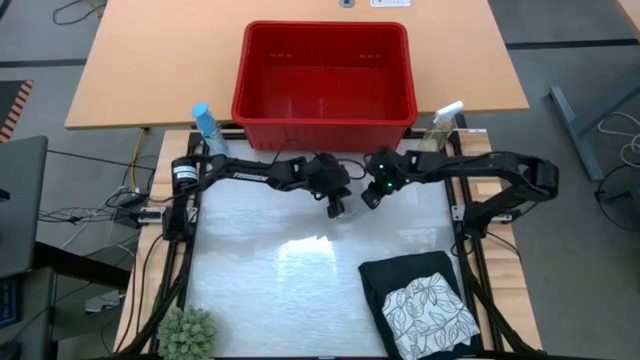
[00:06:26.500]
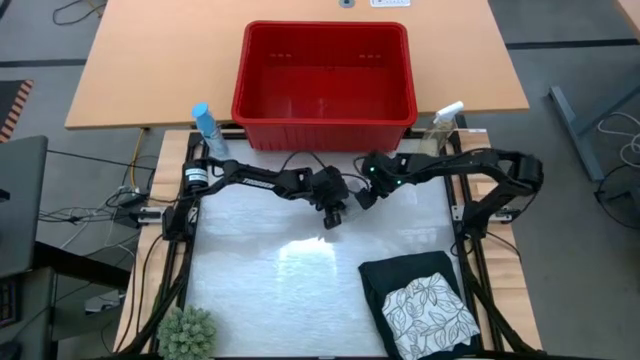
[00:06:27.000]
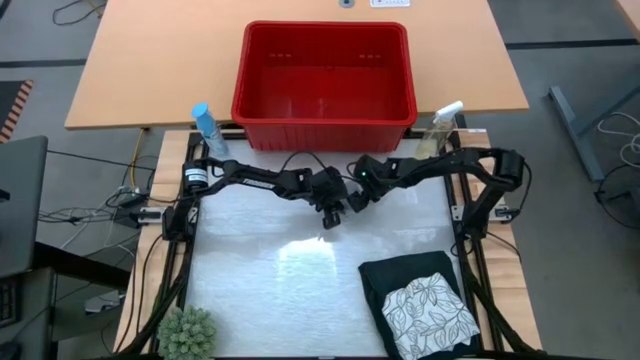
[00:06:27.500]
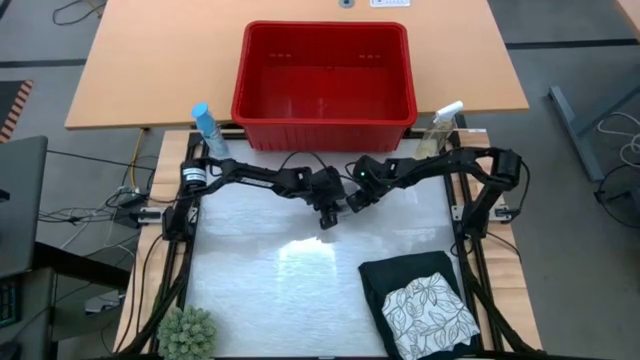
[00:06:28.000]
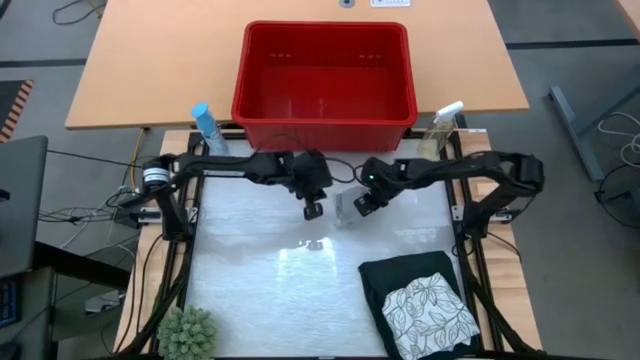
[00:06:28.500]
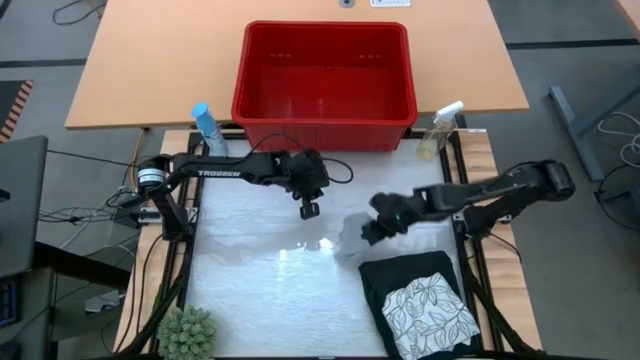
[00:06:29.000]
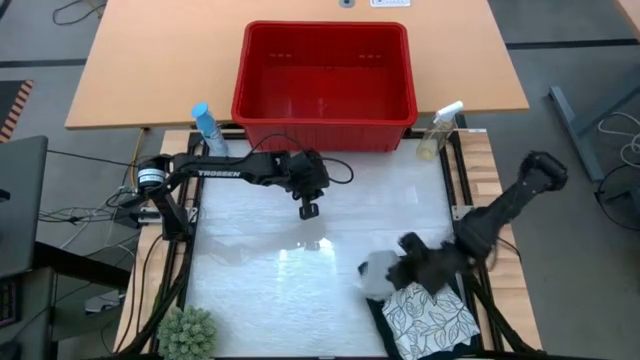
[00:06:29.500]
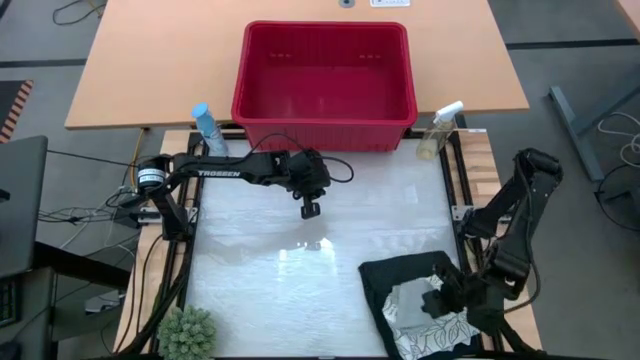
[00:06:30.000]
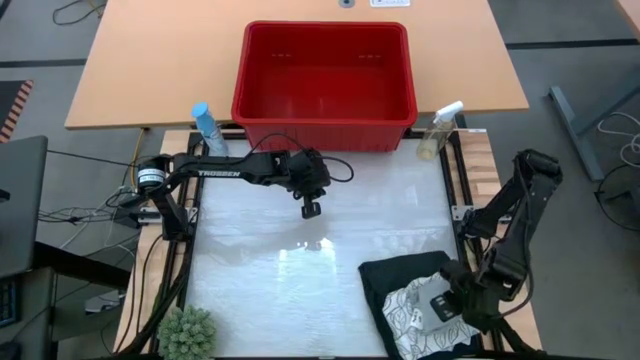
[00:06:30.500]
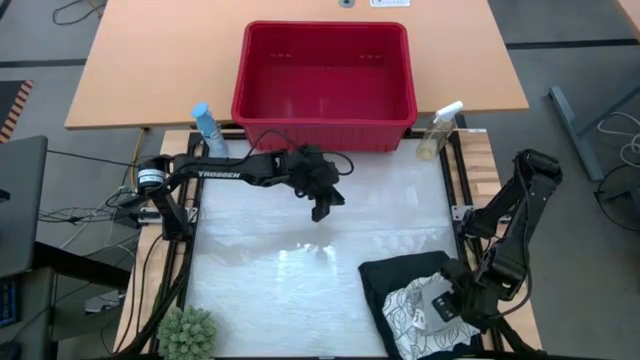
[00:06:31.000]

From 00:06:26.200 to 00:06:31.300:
Task: Fold laundry
Stack the gray boxer shorts on top of the white-patterned shirt

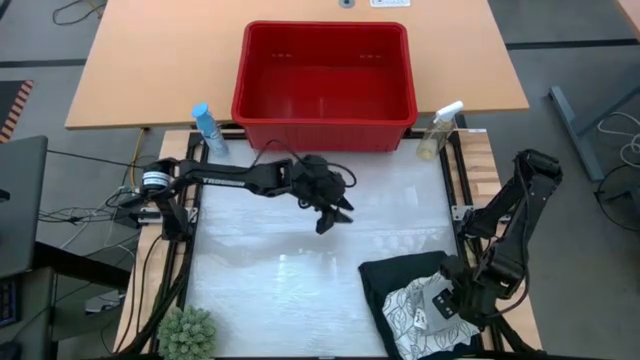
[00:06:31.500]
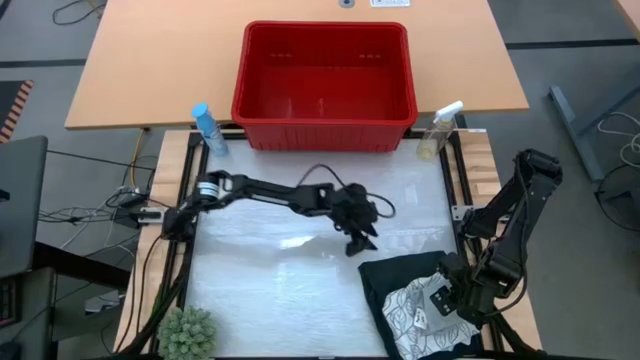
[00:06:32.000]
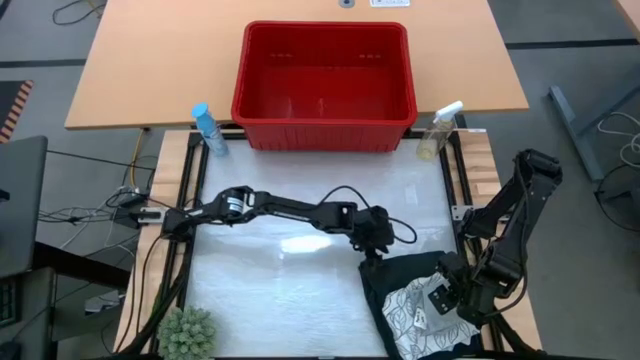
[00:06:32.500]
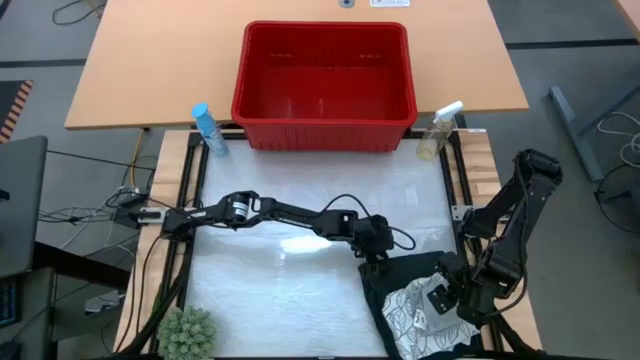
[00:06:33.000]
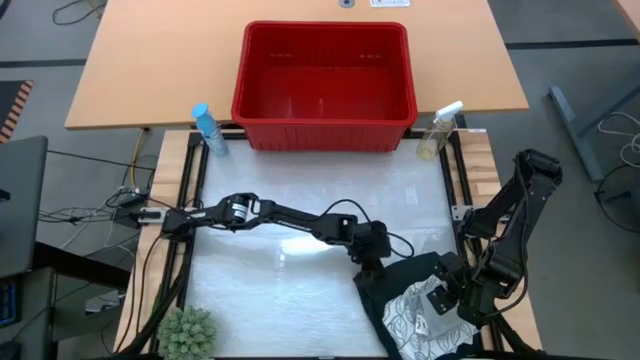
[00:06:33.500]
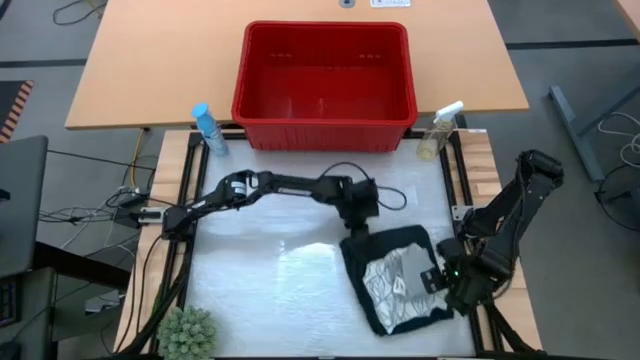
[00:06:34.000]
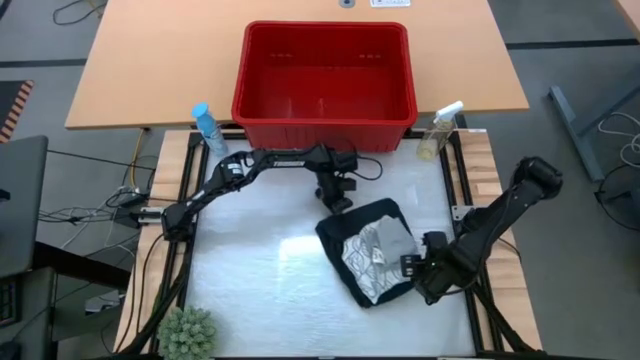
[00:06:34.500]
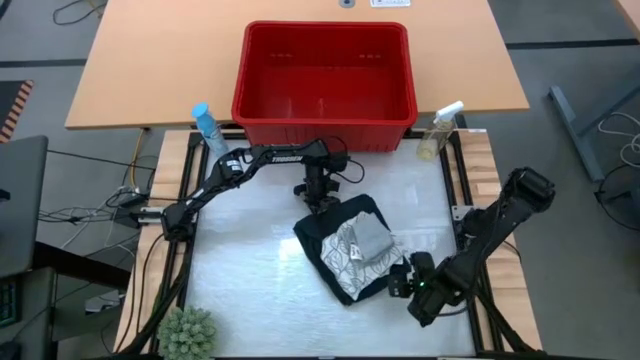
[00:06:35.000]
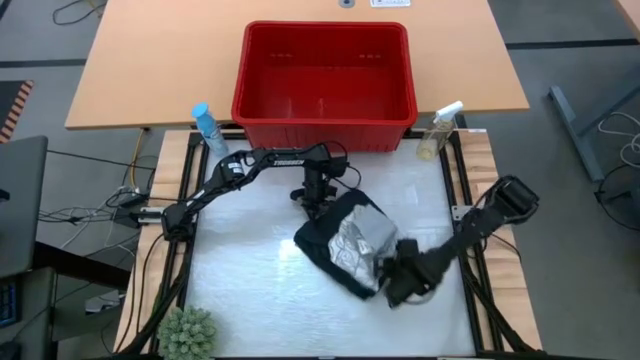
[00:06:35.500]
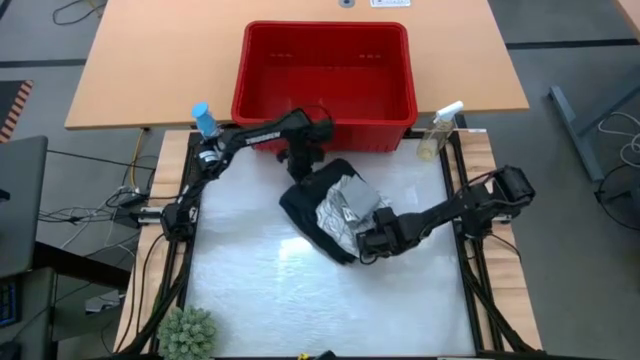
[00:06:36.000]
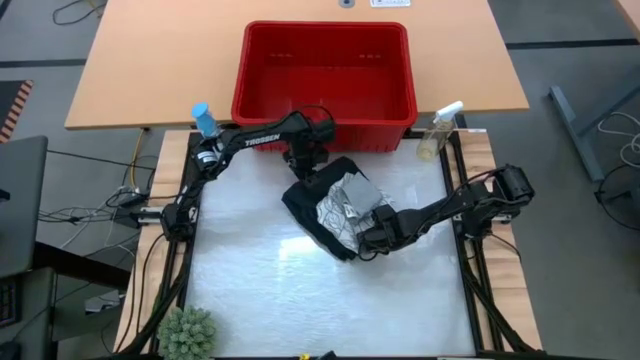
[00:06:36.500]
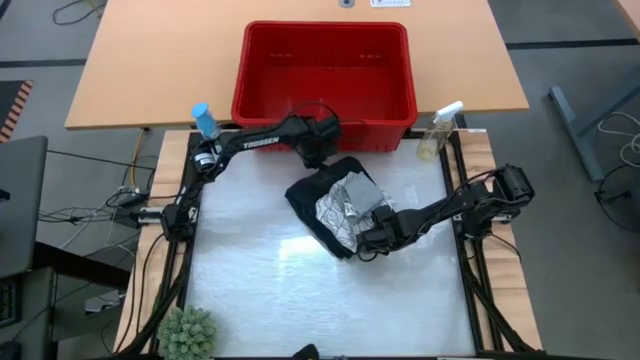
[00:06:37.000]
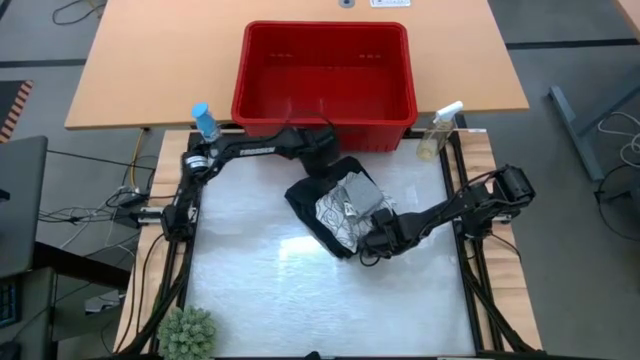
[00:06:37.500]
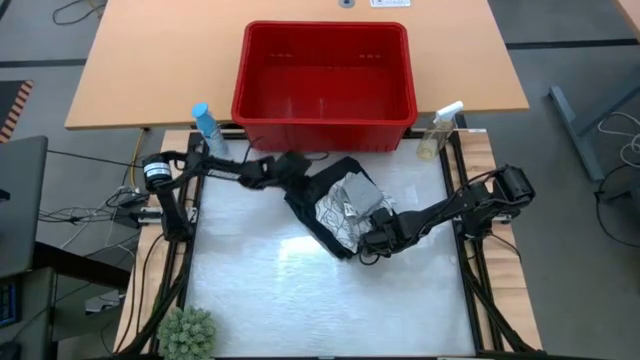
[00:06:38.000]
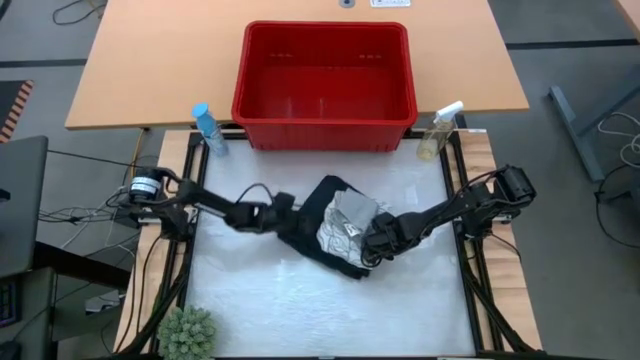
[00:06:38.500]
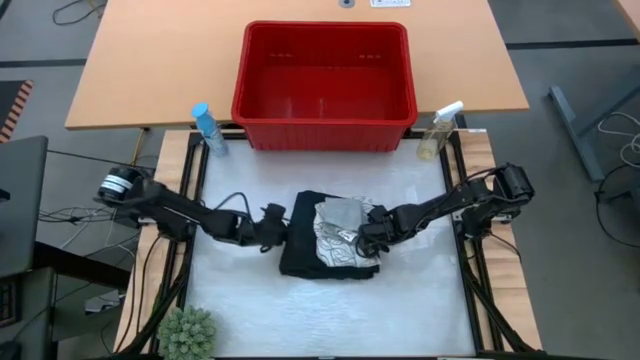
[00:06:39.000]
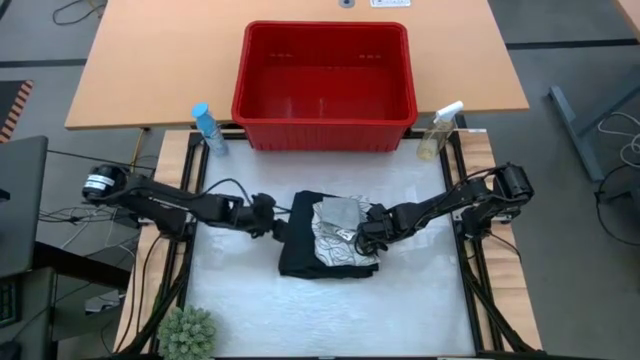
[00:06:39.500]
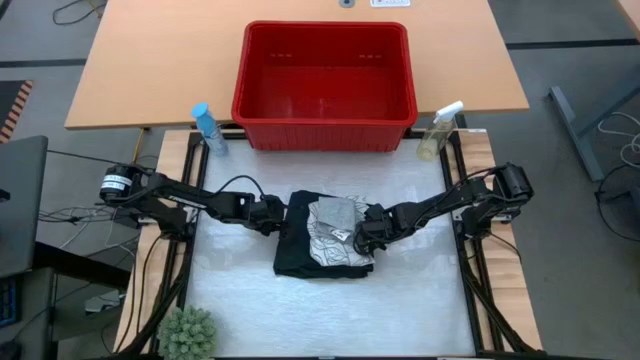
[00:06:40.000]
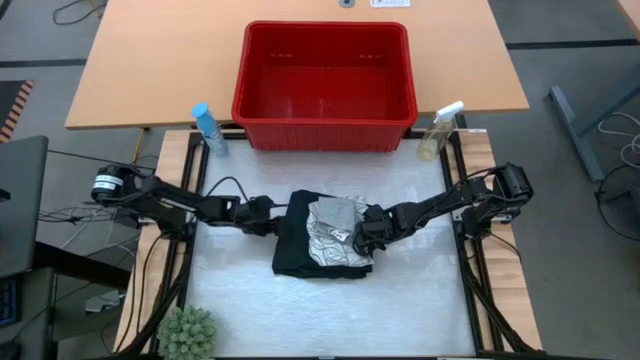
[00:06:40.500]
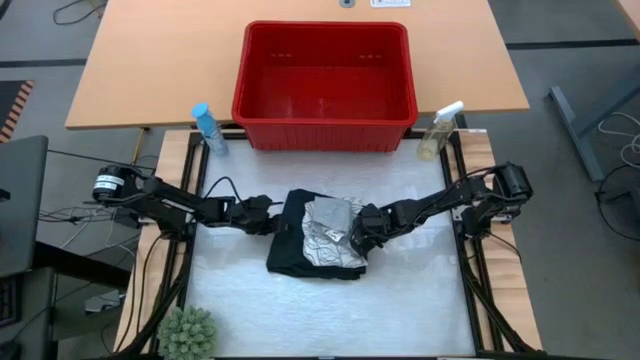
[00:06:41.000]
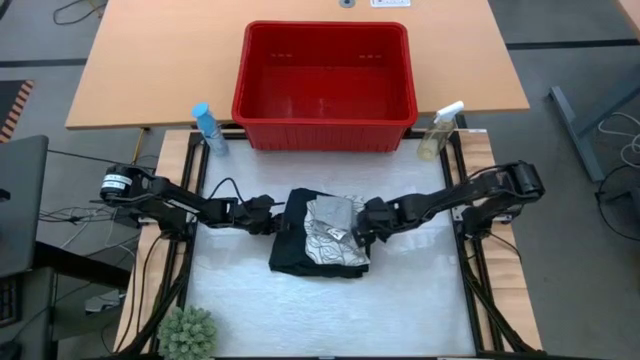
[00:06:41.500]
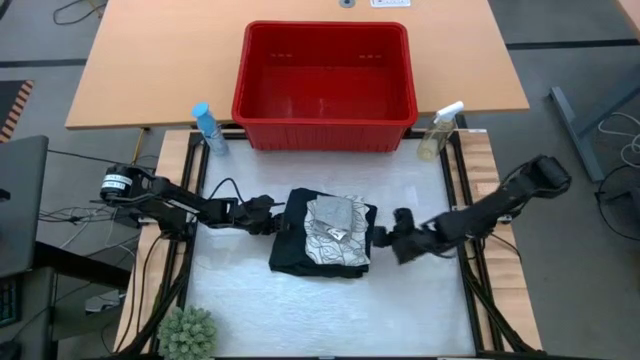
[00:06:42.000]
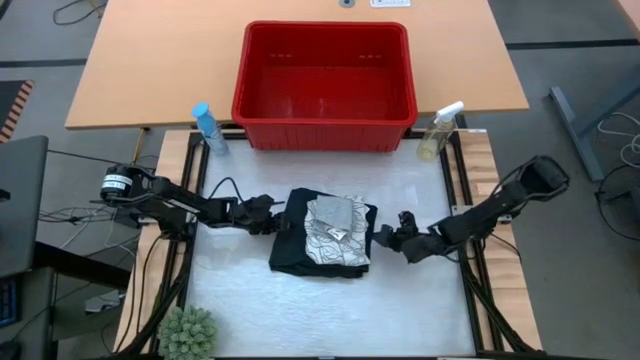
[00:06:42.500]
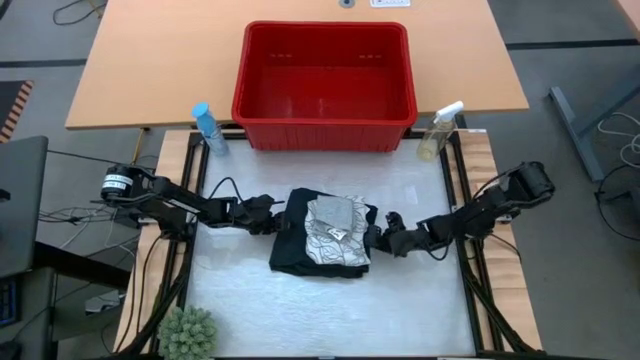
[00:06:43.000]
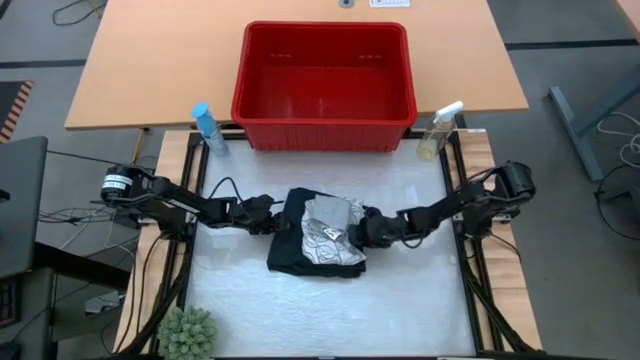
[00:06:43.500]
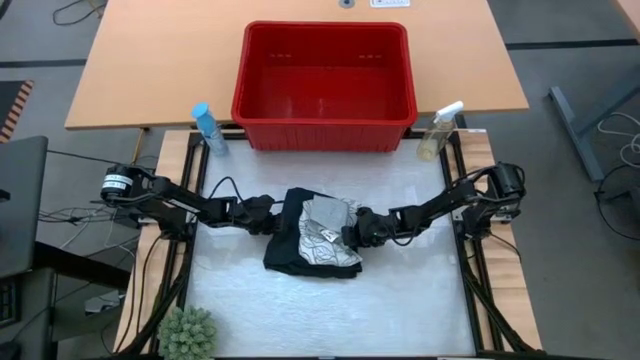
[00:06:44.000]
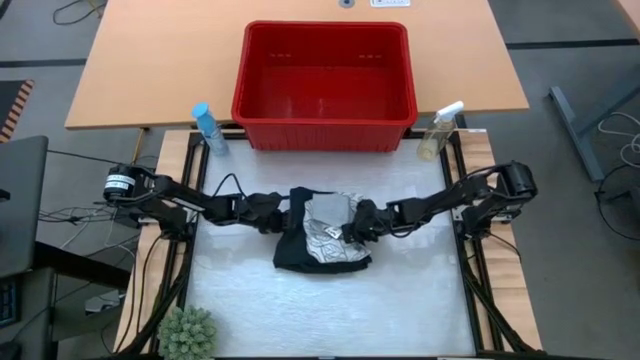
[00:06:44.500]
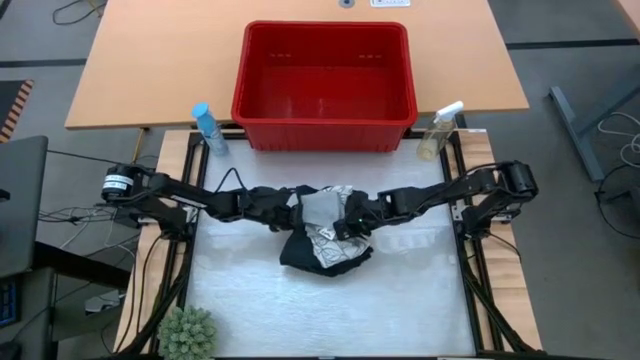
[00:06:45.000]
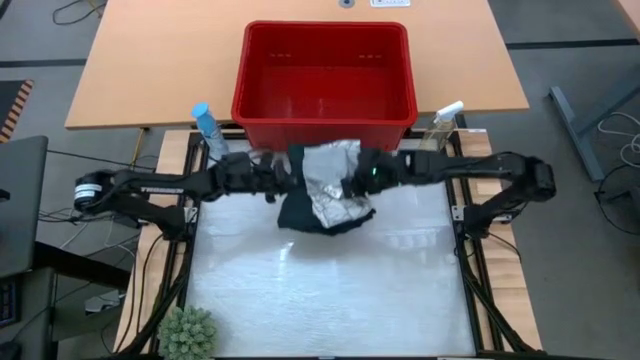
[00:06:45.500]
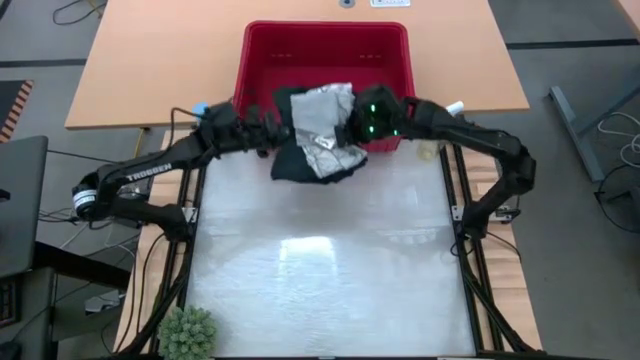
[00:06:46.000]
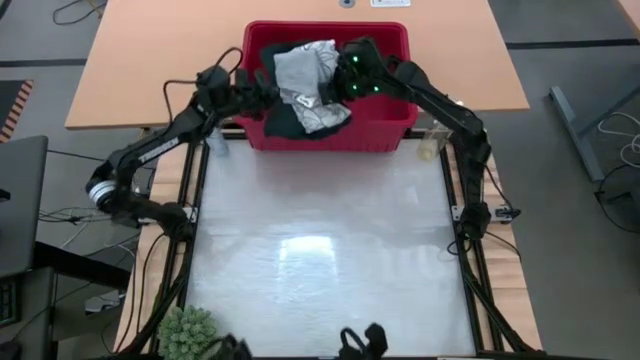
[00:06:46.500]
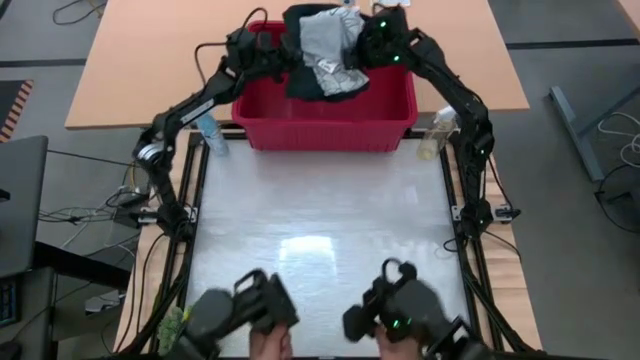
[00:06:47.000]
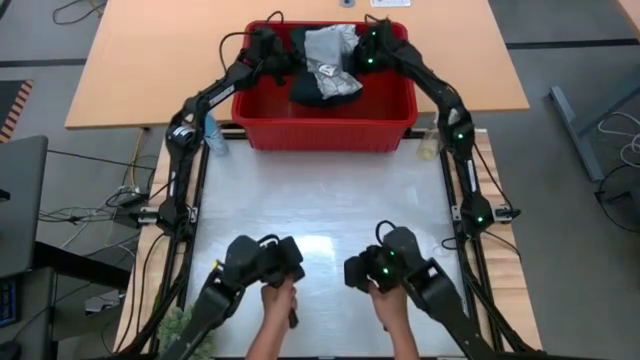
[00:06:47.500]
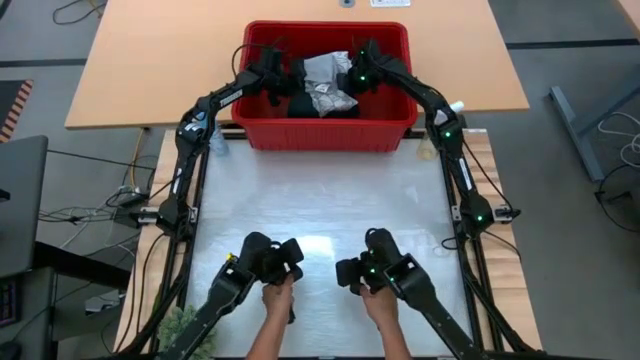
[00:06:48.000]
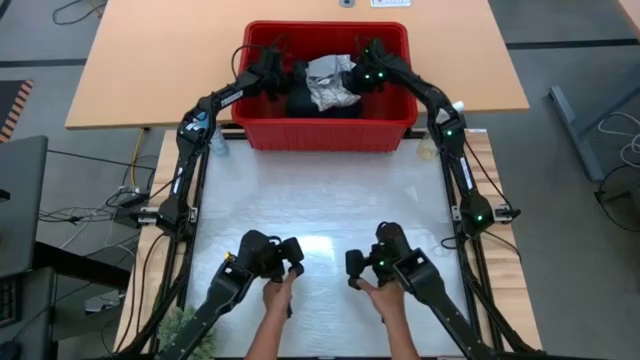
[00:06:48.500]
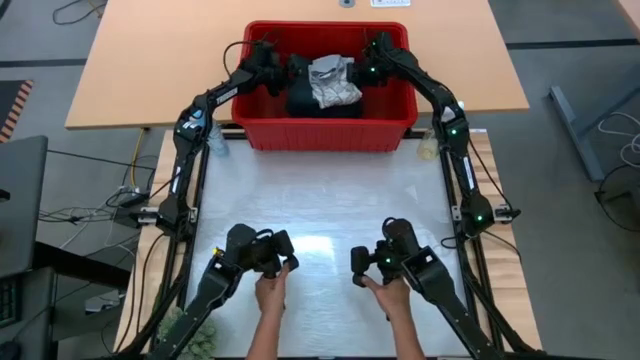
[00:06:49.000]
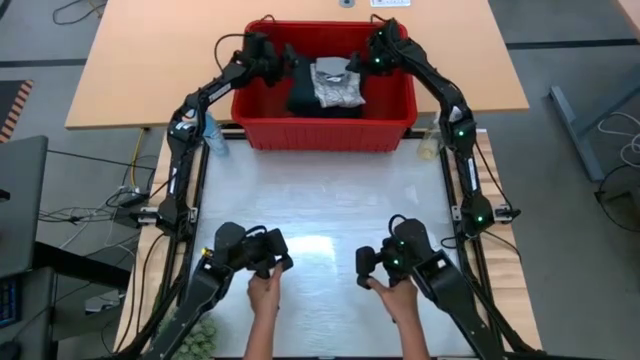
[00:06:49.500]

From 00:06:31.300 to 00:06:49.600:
Put the stacked clothes into the red bin
